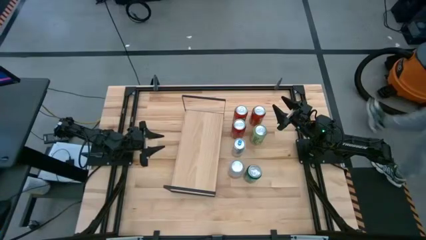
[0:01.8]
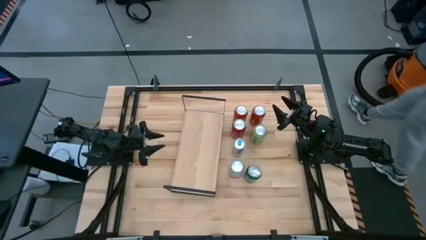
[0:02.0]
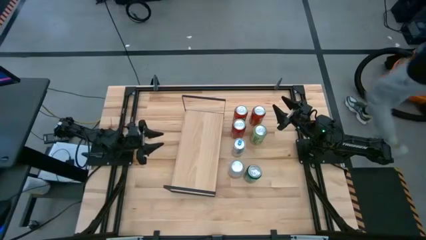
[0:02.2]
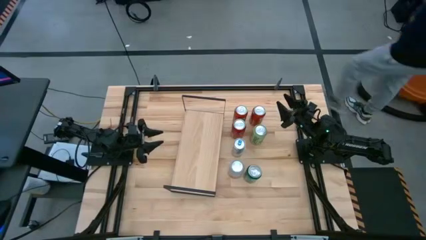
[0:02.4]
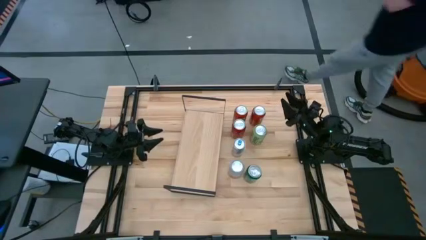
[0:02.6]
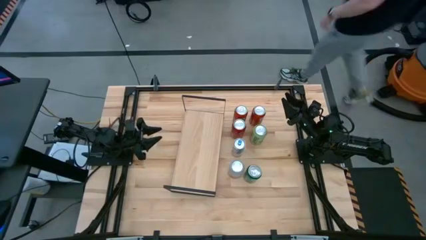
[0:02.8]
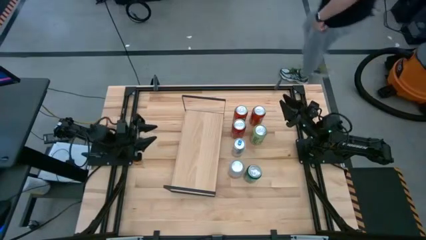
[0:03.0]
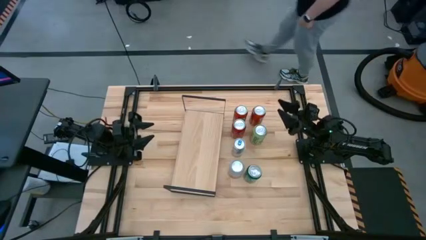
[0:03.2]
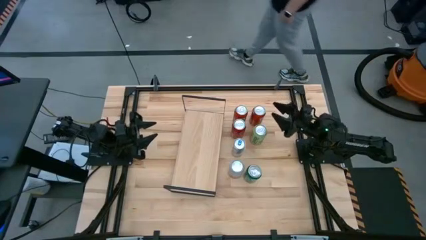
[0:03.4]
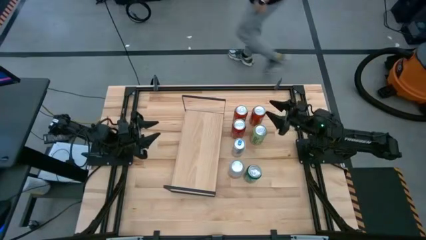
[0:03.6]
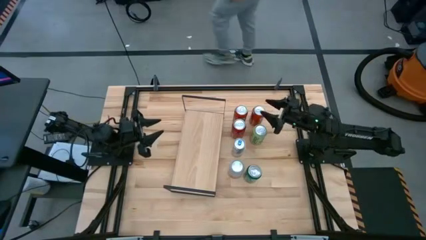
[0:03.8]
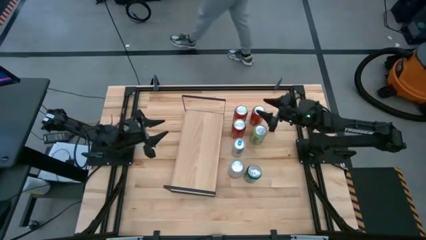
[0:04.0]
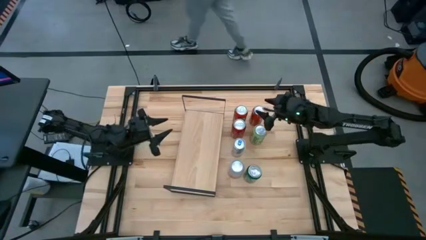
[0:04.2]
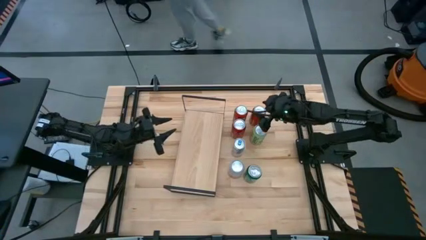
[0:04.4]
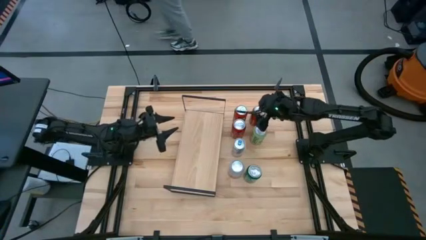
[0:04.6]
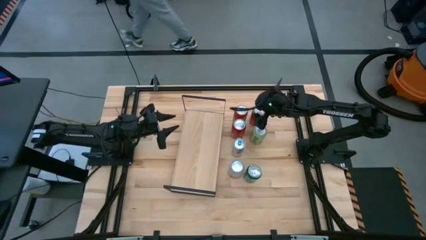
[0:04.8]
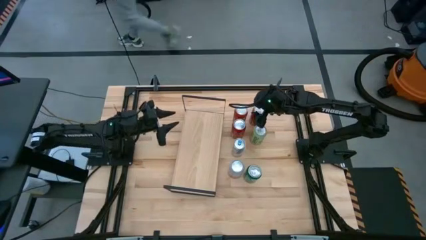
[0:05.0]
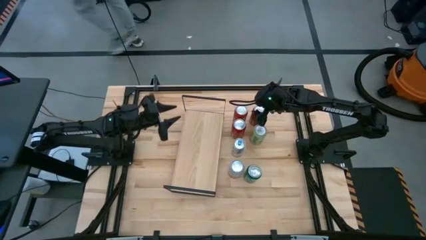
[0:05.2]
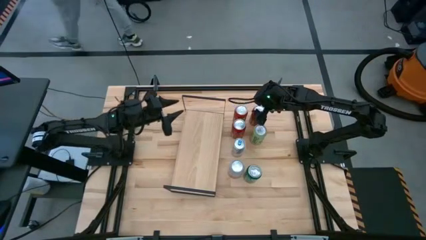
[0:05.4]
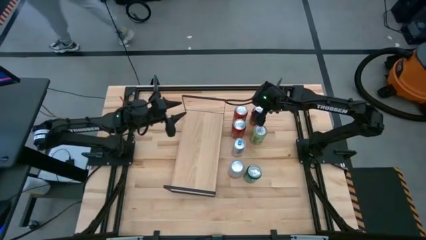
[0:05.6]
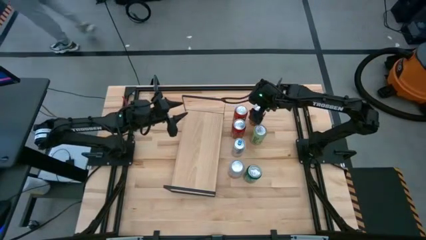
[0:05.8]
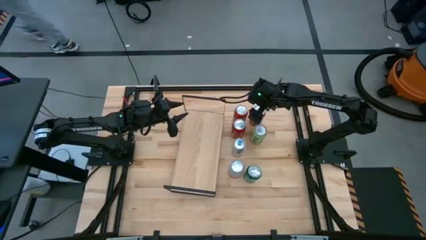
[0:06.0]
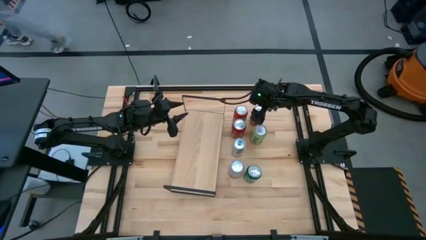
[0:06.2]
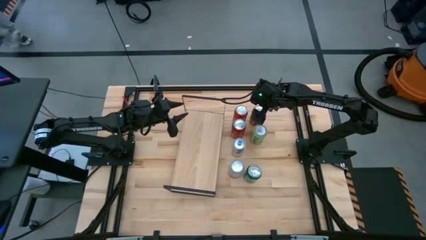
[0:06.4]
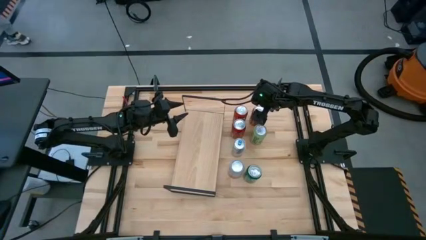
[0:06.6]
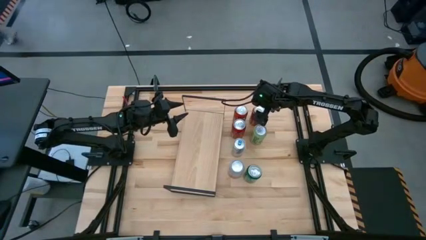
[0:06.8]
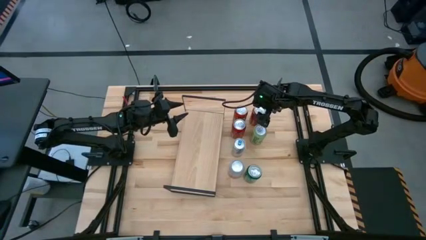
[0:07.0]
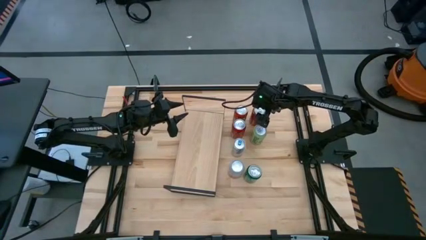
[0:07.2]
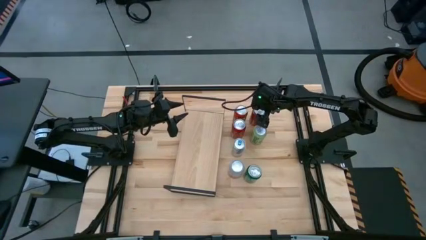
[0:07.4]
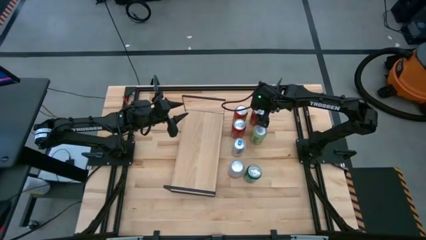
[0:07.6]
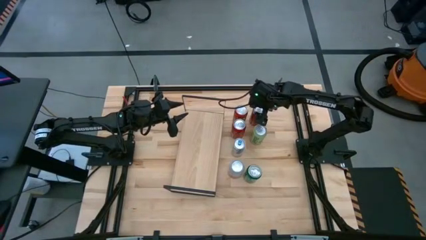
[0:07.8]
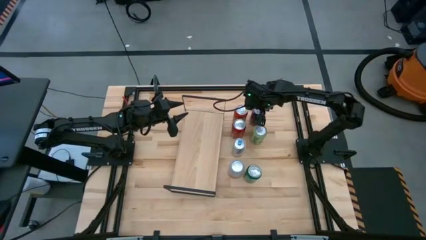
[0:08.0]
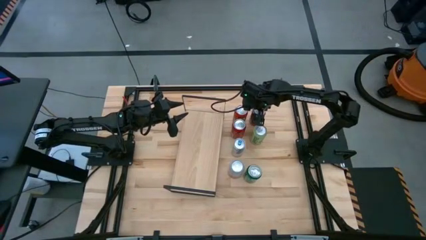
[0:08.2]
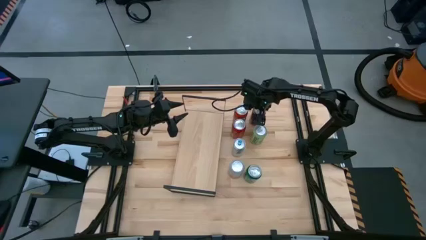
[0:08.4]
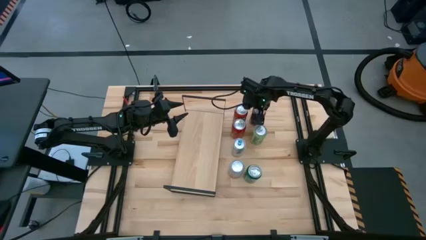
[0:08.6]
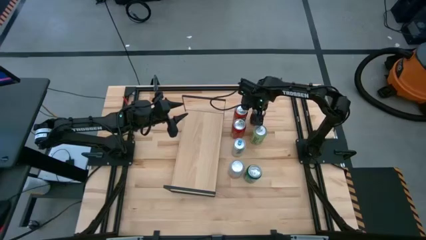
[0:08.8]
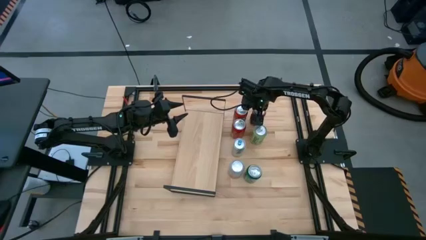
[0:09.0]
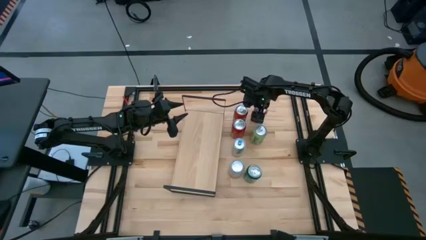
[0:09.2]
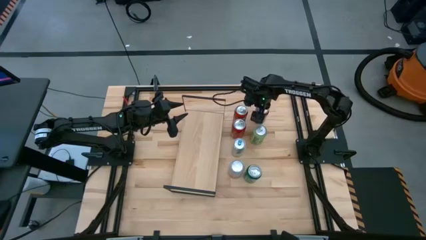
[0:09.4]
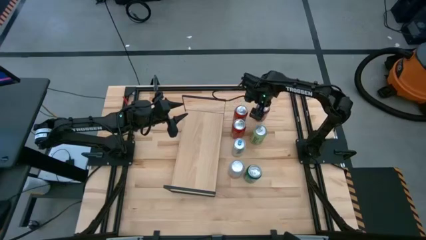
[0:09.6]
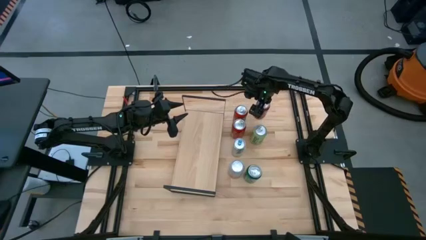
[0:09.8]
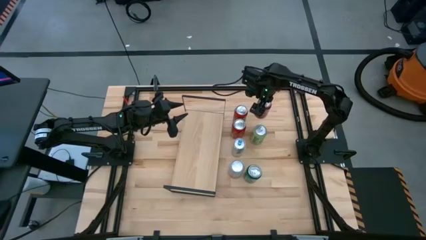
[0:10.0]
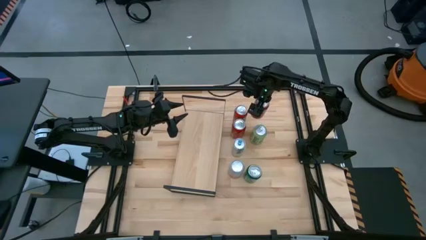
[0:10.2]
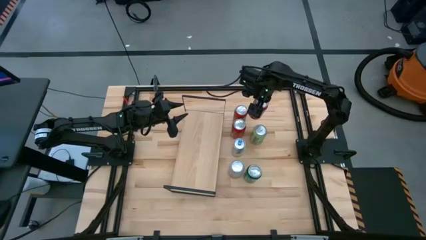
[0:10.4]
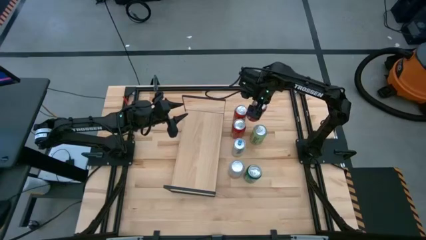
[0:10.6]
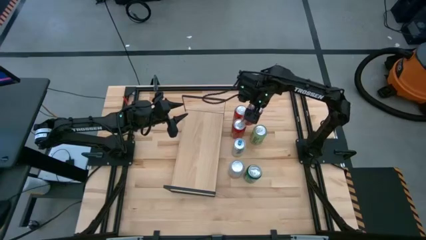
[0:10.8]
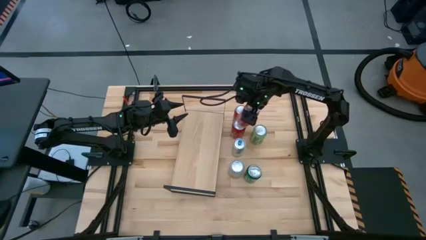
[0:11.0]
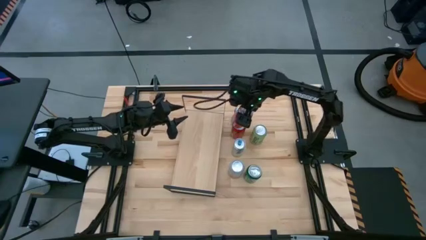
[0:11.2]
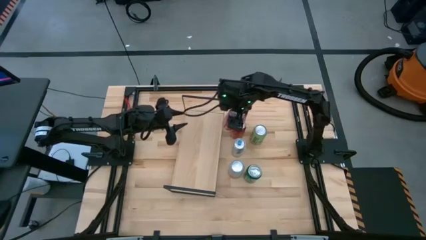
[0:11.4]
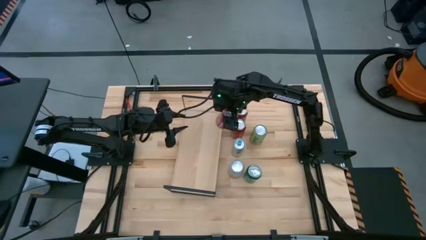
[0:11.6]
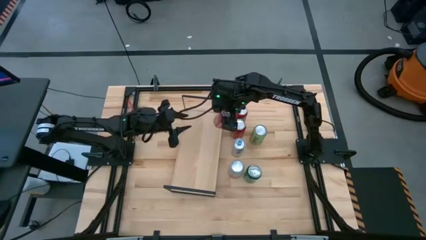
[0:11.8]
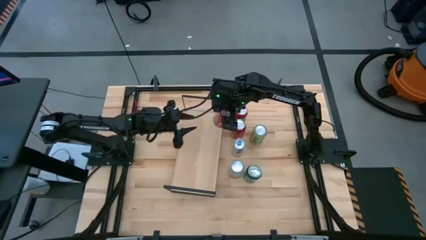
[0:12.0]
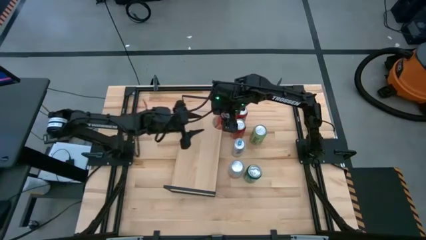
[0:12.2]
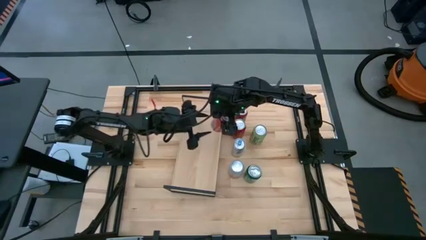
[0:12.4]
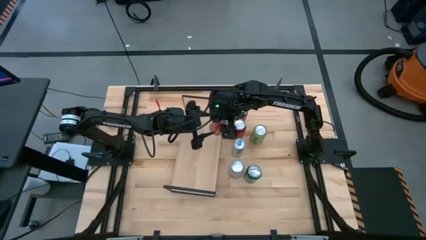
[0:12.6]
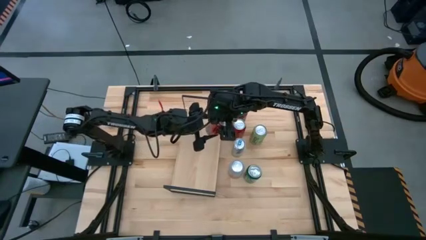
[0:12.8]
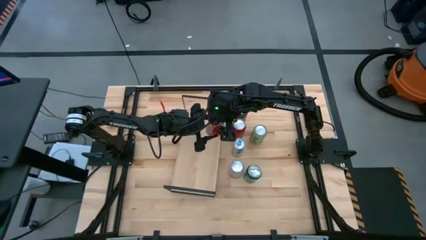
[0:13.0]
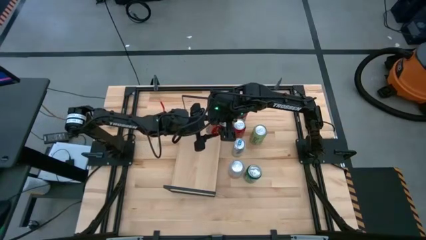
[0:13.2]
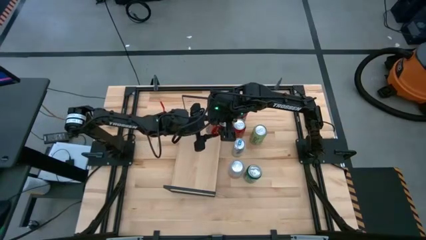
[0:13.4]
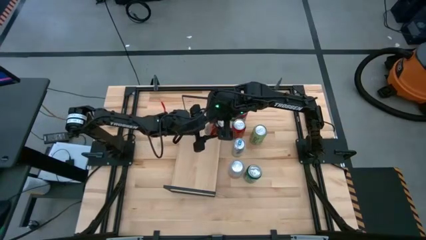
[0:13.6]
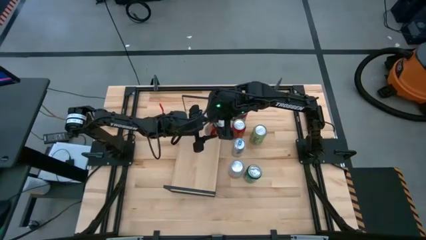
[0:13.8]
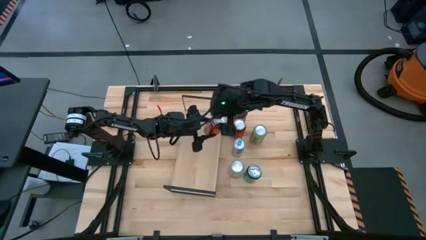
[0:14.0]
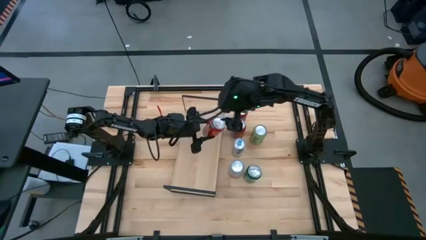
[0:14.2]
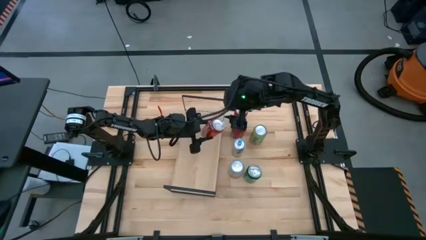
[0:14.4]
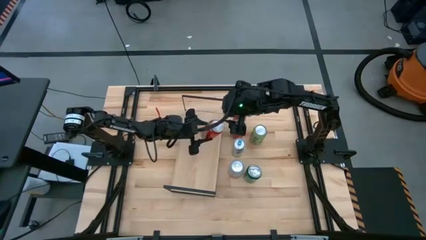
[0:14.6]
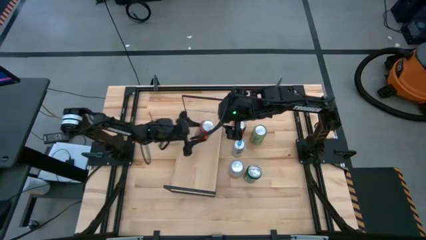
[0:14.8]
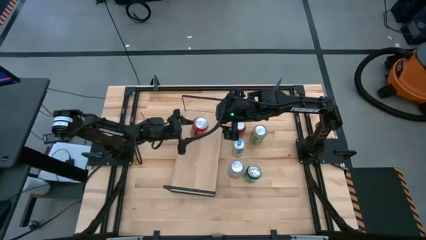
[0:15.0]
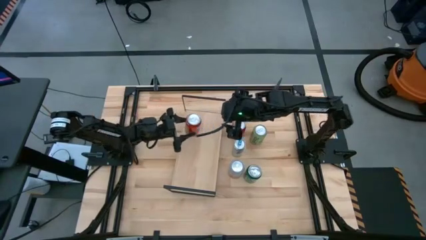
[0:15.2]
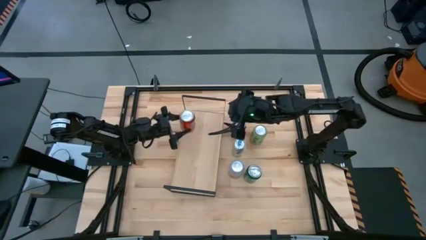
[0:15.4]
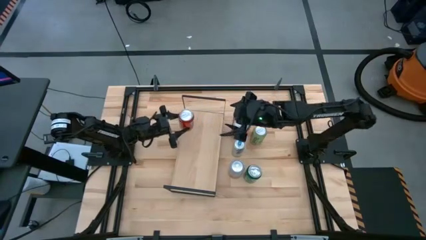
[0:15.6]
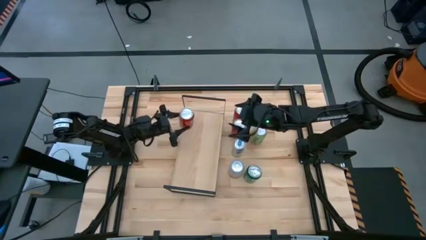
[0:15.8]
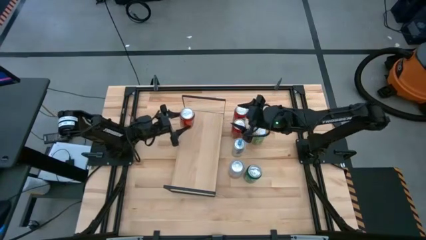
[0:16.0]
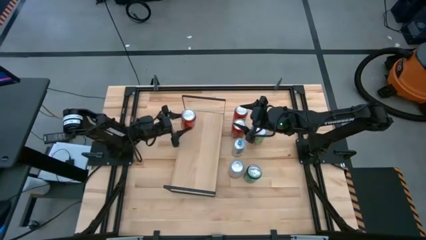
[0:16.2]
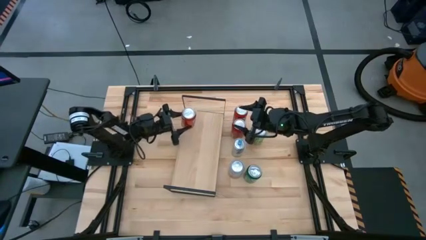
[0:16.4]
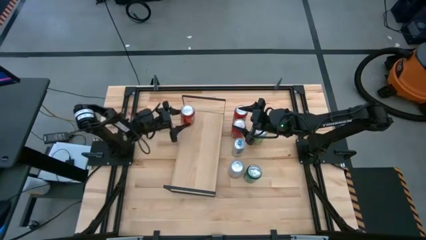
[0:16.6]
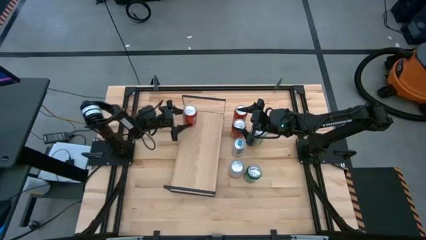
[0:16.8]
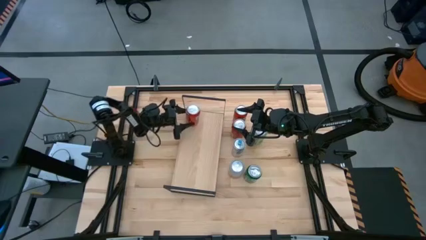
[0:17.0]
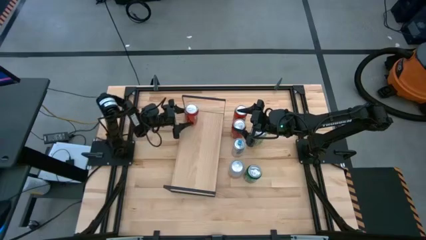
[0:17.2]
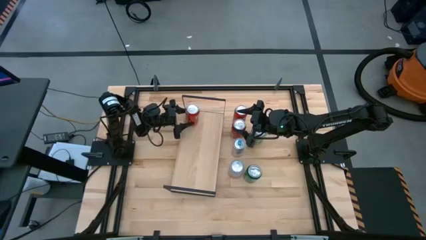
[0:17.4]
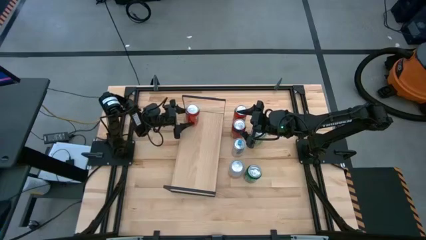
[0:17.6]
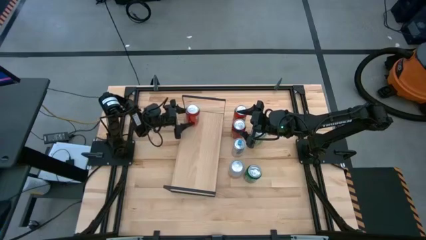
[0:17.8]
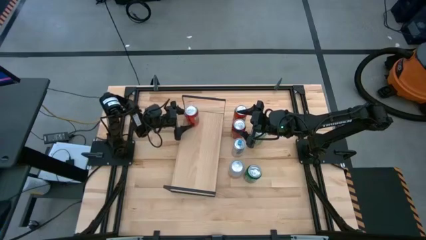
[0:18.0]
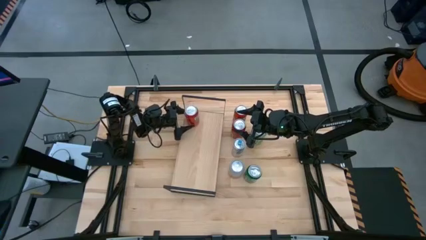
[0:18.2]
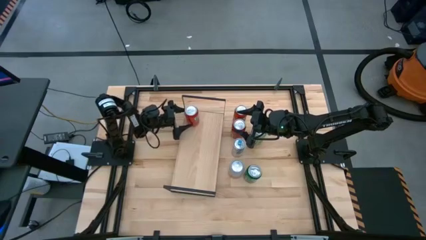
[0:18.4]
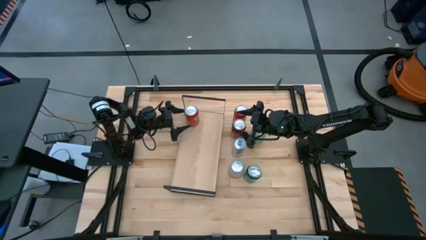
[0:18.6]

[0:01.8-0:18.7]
Task: Place canned beverage on shelf
Put the right orange soda can on the shelf
